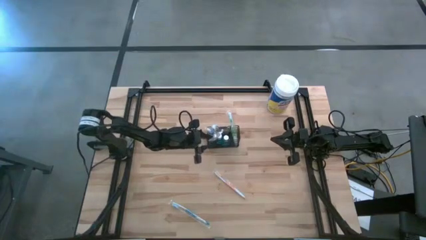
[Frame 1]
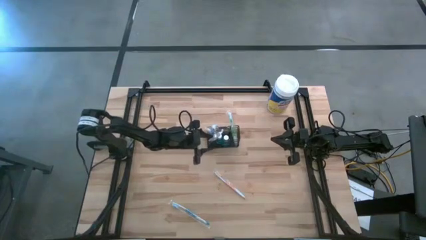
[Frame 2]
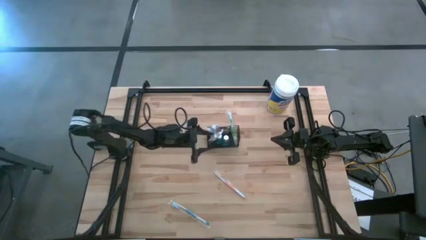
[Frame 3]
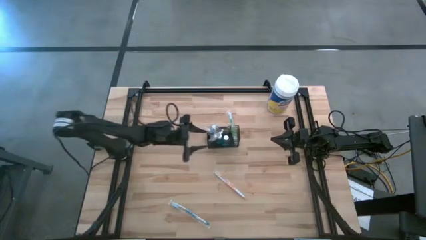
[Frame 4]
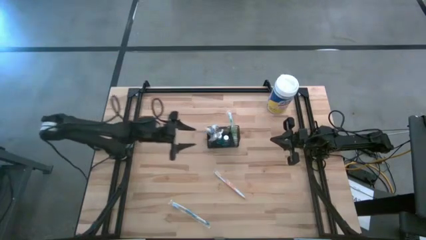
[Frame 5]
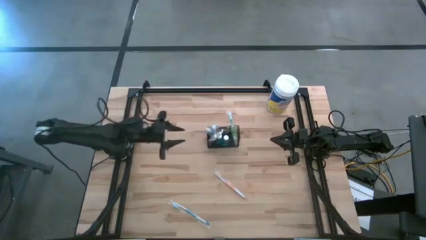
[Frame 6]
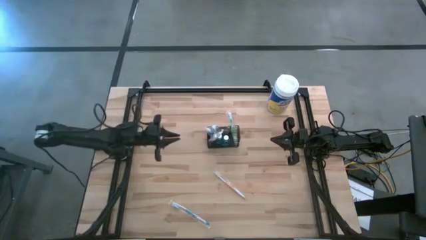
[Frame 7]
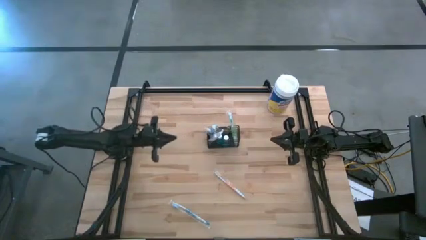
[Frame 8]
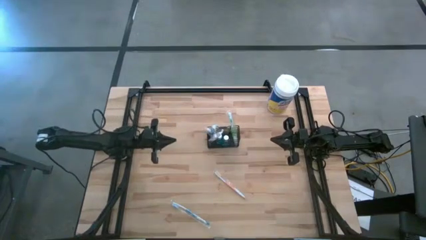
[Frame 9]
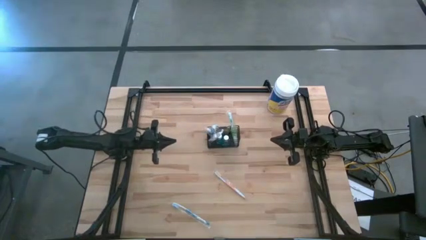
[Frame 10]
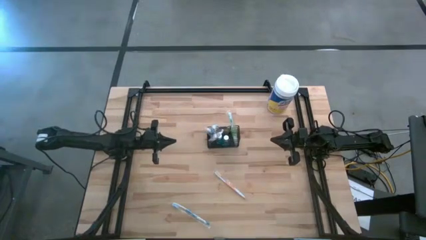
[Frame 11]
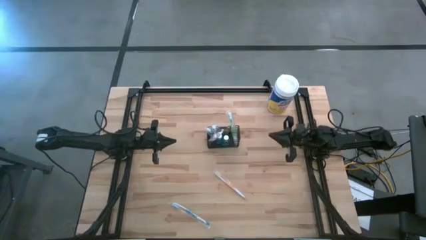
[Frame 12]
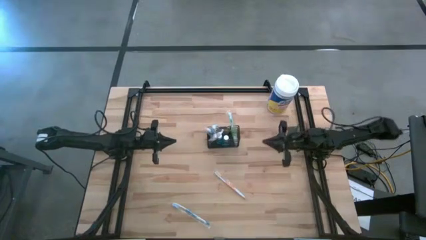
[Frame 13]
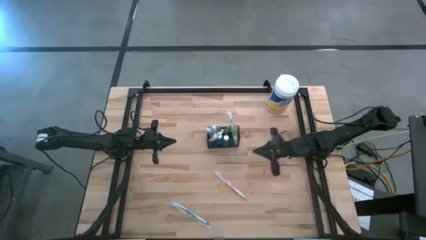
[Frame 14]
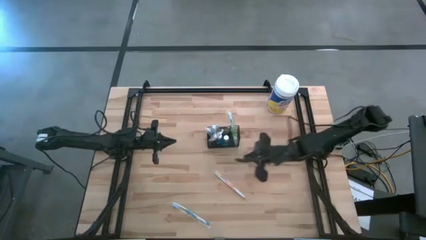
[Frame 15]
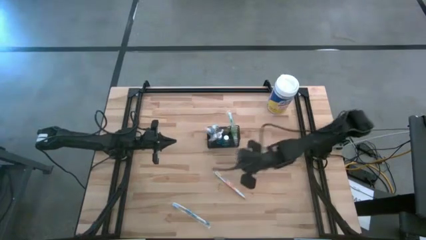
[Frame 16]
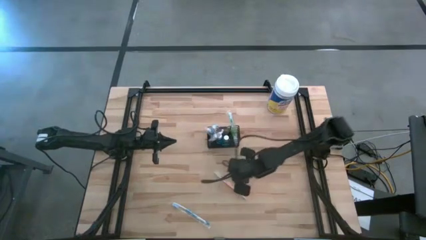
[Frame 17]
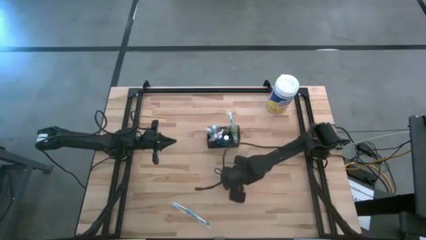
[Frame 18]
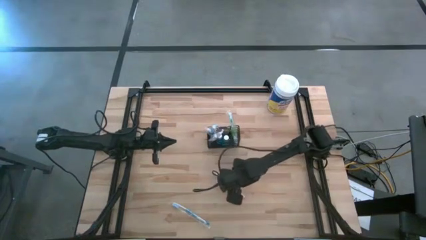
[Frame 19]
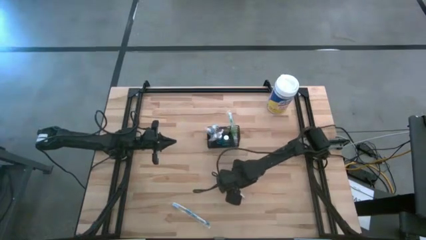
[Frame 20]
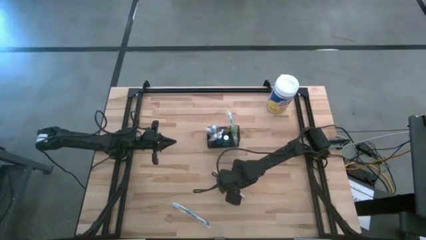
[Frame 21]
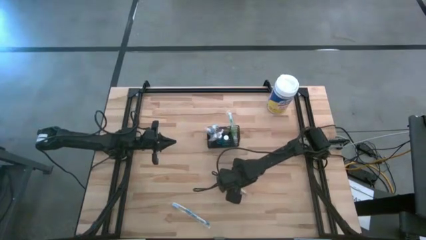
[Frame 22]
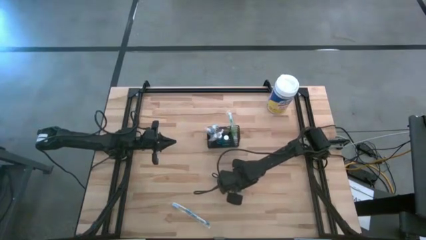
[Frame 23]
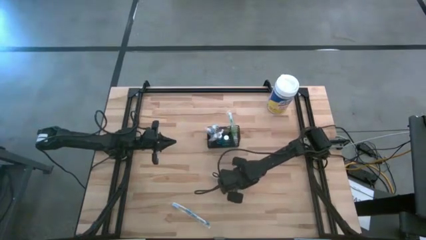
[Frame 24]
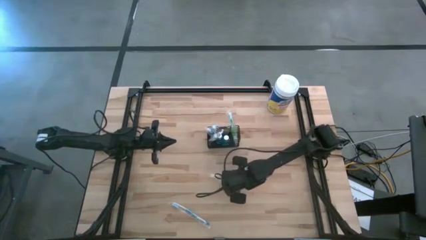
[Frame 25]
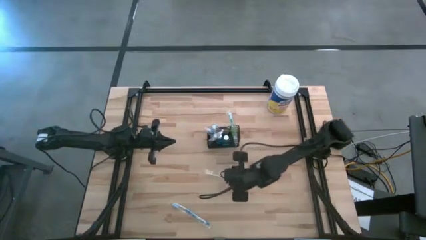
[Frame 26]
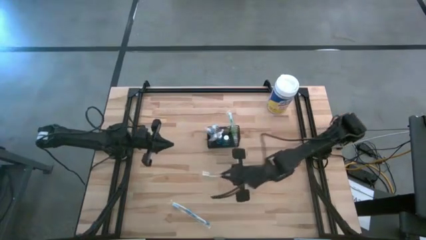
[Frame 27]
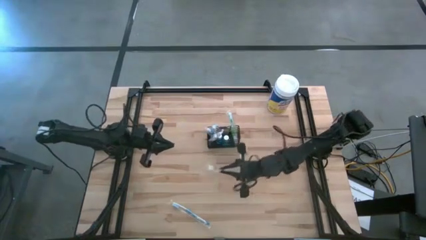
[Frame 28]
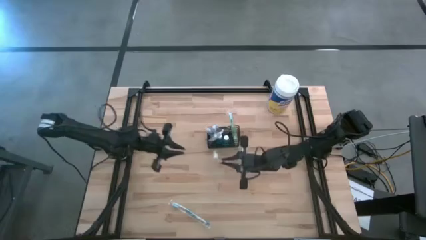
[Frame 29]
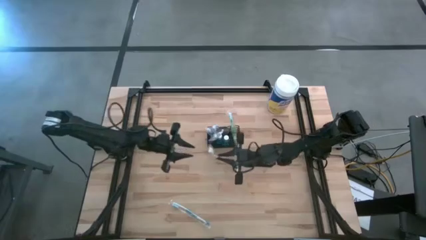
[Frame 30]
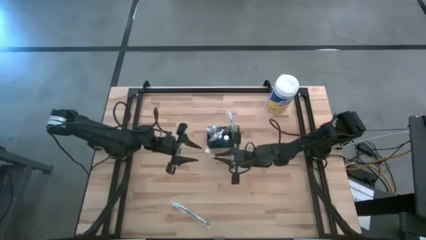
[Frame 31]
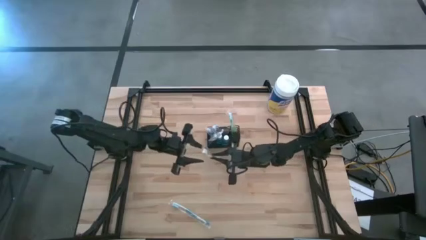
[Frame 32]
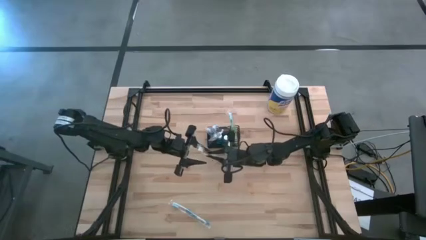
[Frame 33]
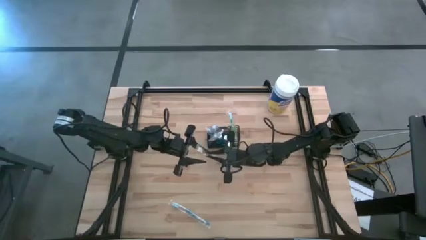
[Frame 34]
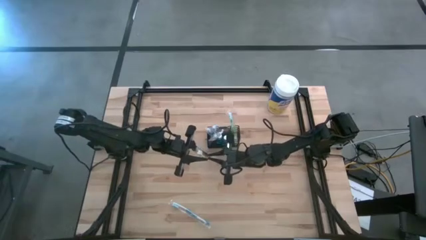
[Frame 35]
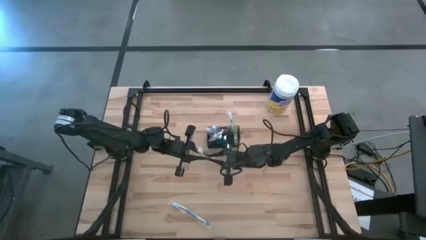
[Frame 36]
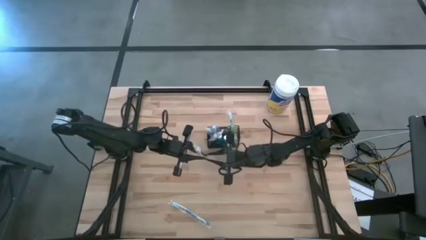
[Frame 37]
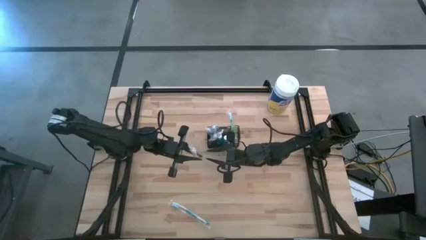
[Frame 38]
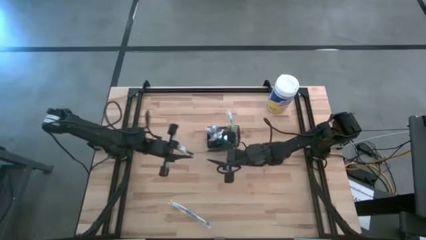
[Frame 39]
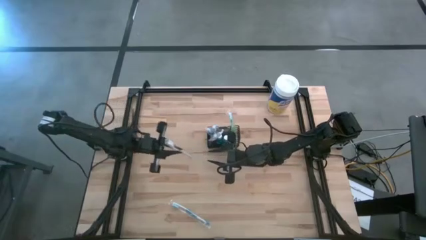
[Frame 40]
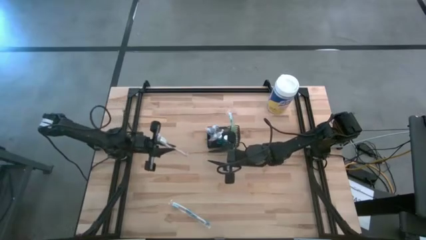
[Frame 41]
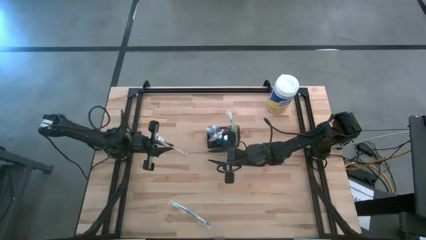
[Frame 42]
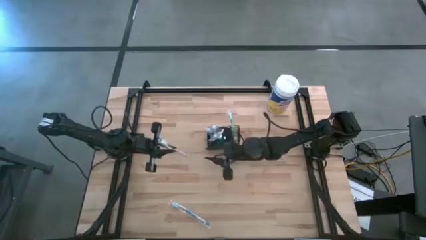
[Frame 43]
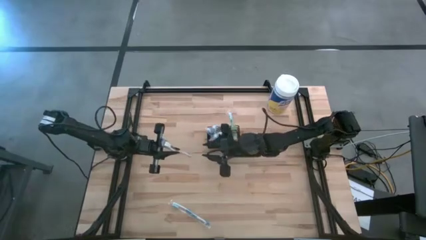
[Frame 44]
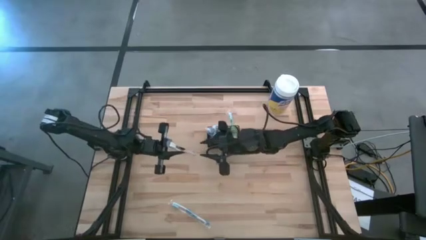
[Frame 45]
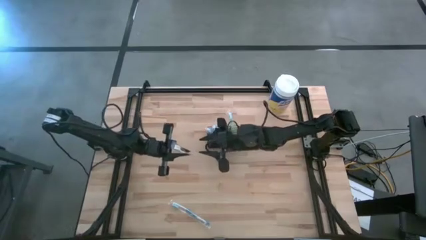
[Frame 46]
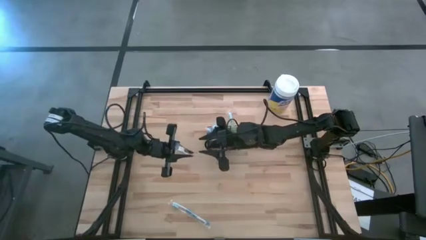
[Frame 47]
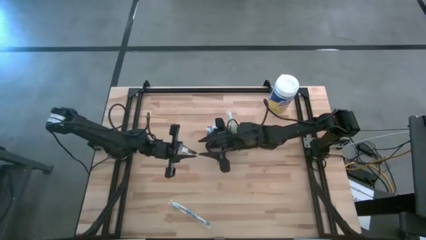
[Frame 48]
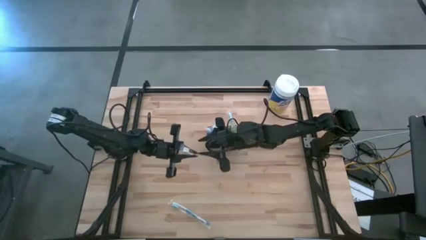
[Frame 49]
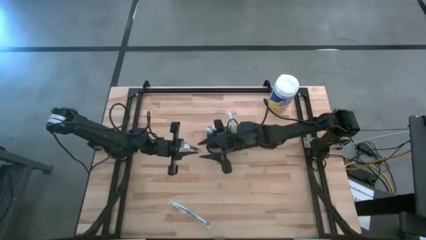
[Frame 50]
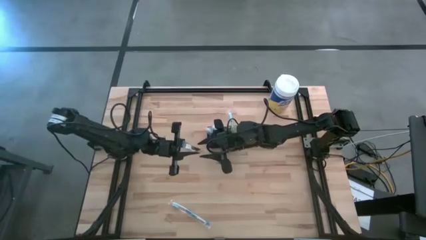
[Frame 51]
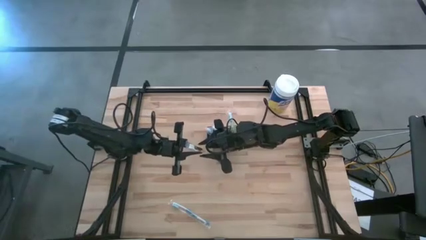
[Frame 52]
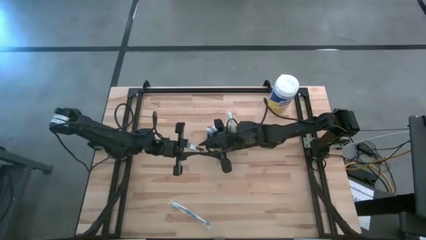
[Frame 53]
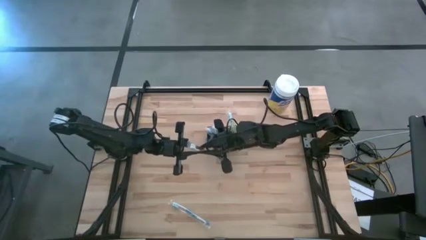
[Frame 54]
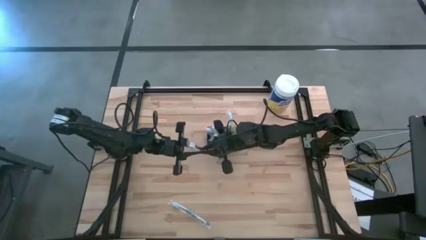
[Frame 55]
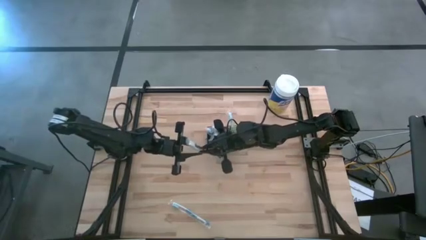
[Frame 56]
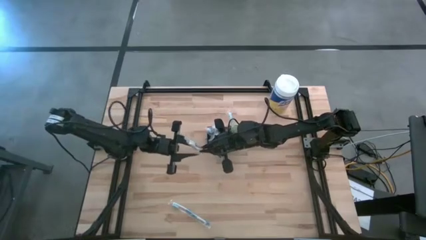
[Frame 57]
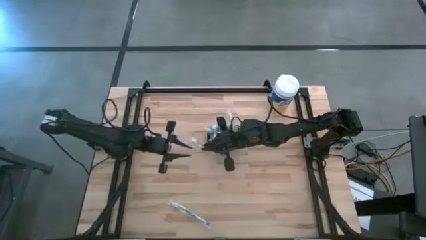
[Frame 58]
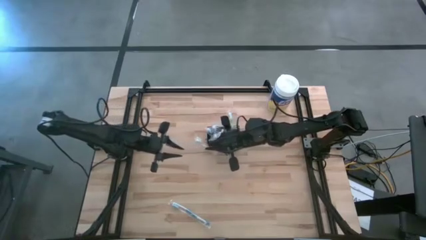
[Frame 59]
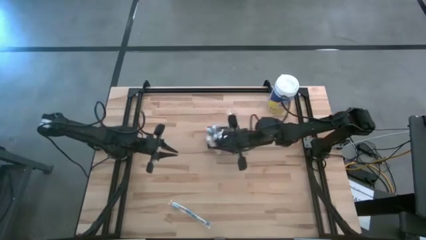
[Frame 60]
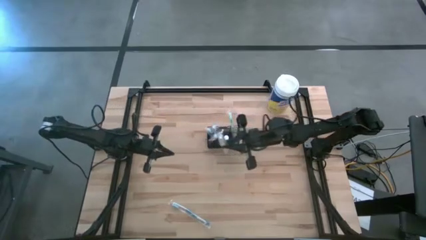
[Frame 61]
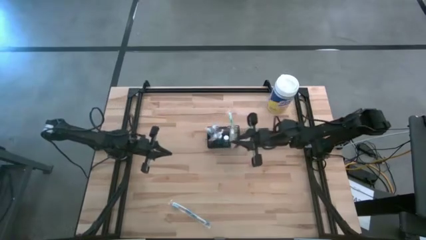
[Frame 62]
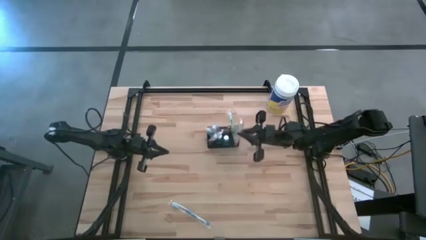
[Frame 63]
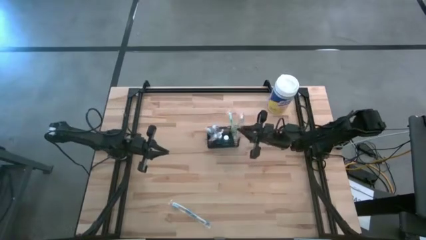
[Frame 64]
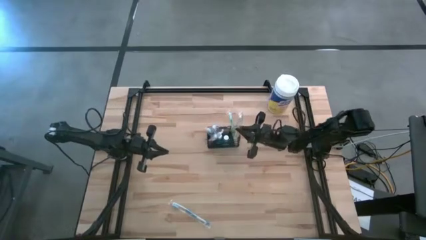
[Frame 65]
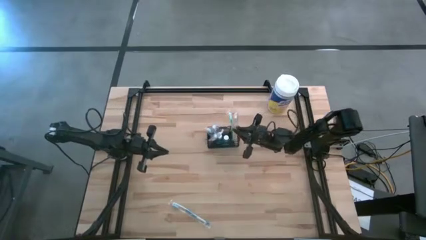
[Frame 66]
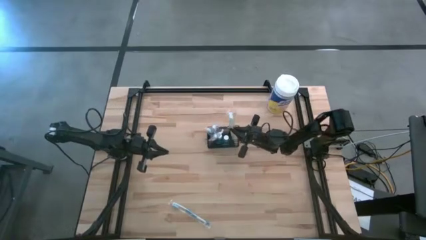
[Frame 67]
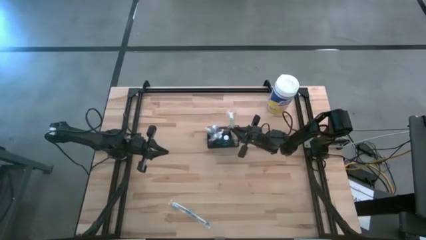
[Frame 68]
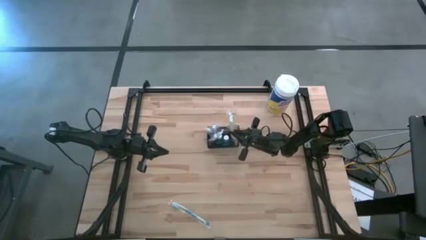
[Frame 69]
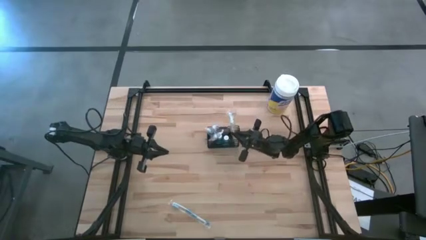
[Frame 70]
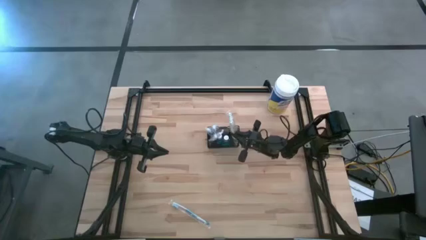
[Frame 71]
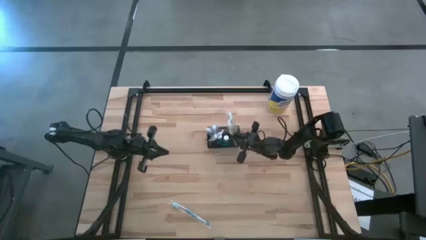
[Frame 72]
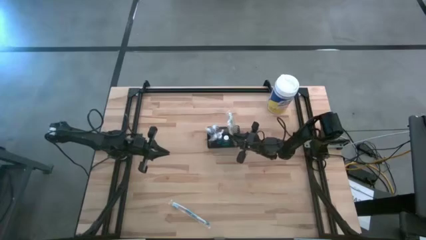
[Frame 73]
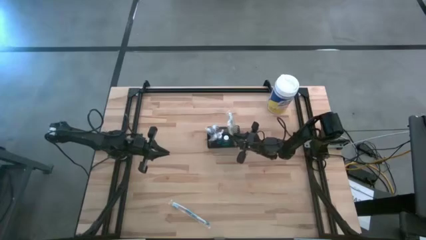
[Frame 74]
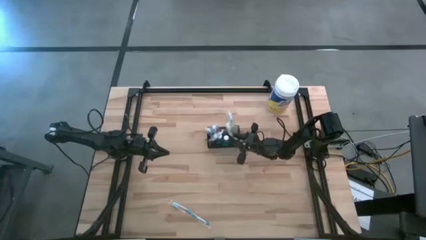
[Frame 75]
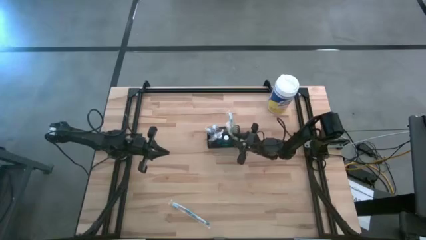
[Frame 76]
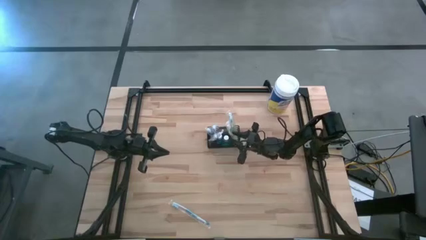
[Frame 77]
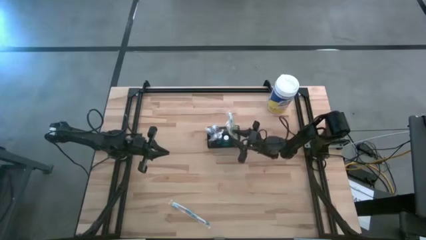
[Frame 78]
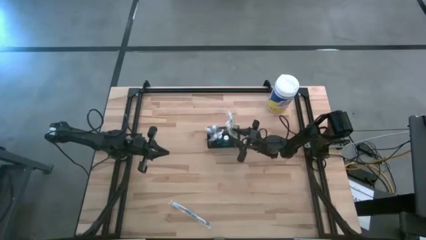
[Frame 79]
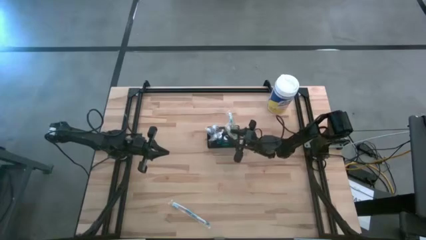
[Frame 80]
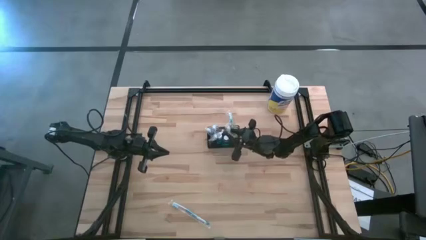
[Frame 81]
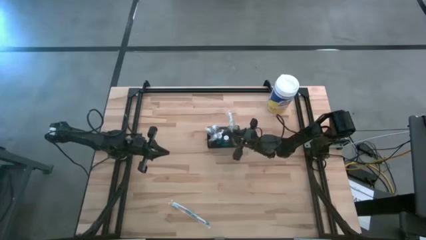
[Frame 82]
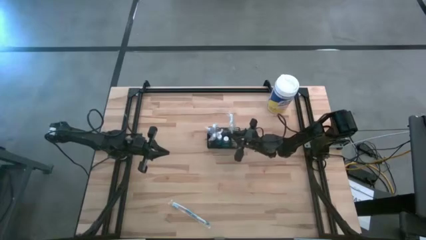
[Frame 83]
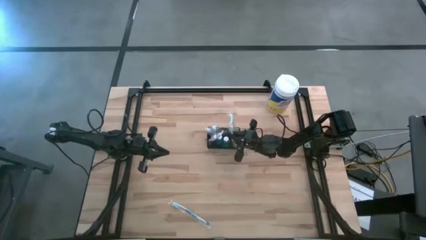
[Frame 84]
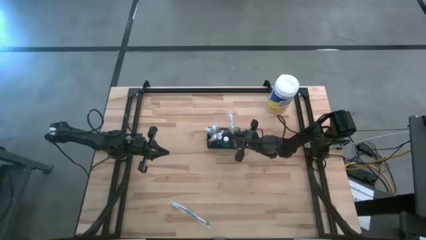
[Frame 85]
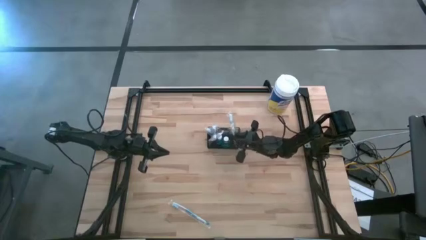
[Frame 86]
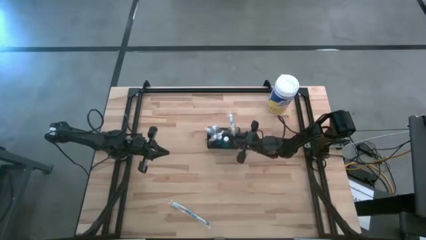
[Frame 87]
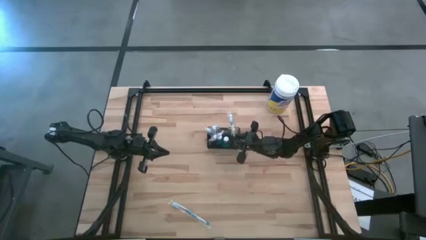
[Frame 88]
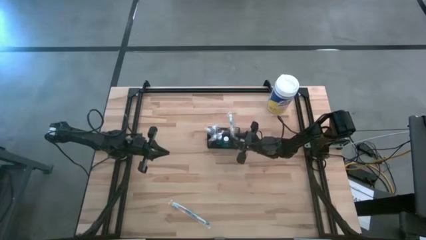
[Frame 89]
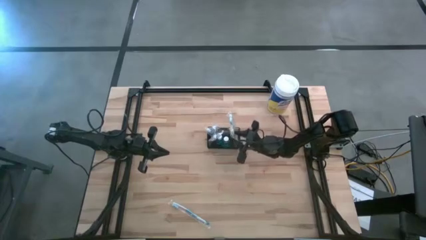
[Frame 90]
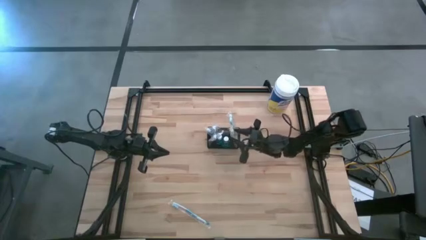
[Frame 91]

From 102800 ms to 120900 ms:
Task: Pick & Place toothbrushing station
Put the orange toothbrush into the wire organizer
